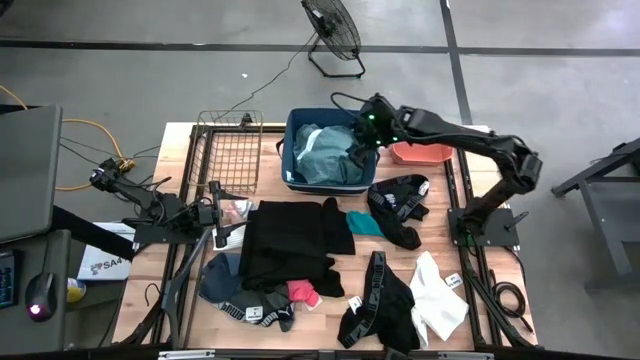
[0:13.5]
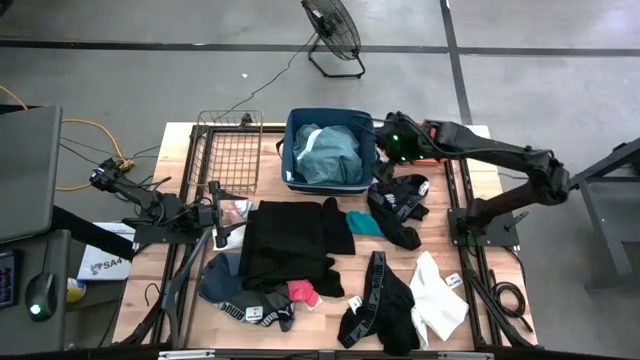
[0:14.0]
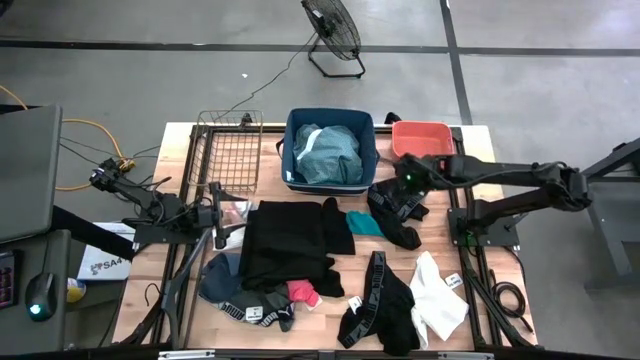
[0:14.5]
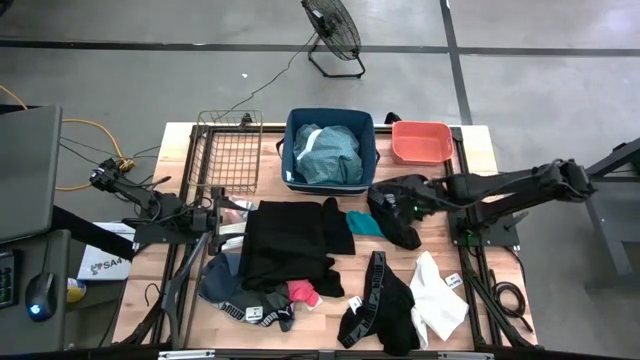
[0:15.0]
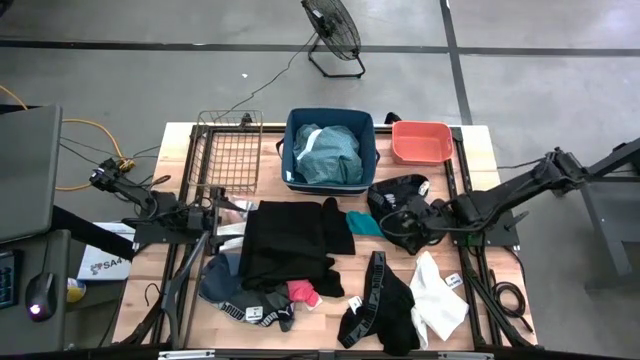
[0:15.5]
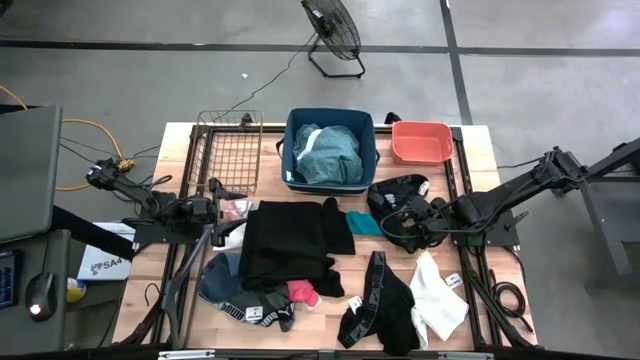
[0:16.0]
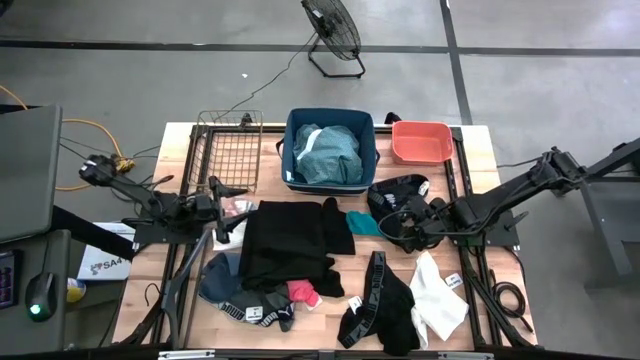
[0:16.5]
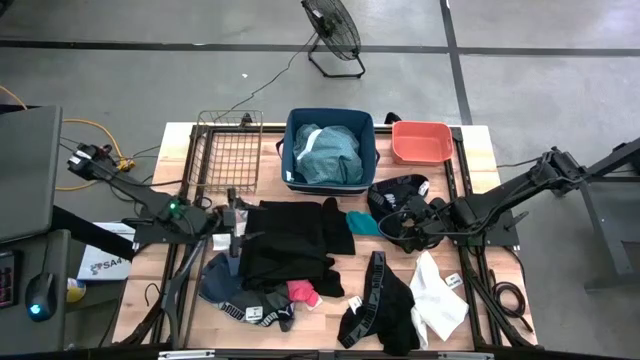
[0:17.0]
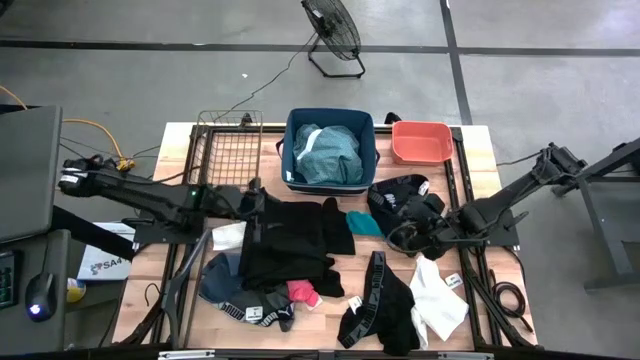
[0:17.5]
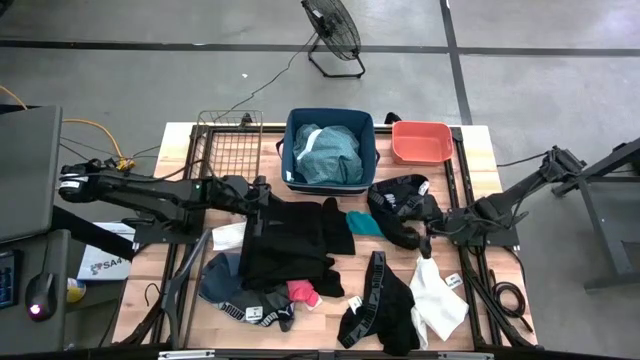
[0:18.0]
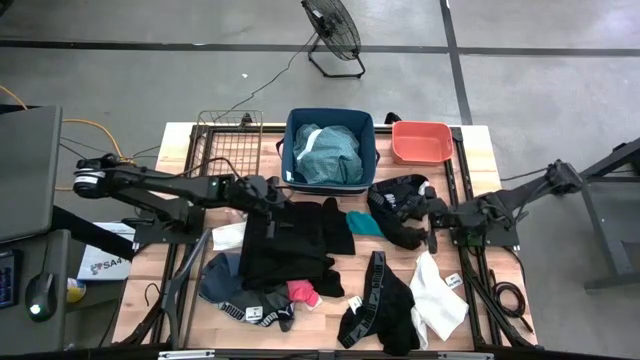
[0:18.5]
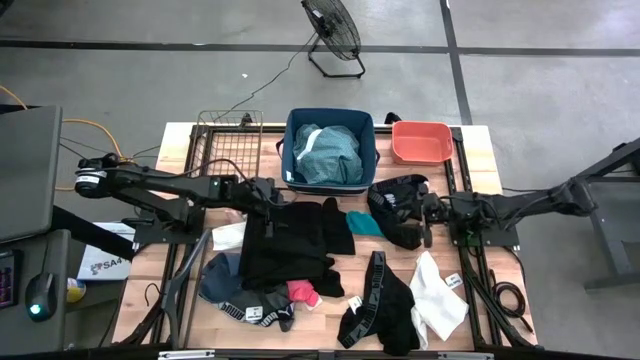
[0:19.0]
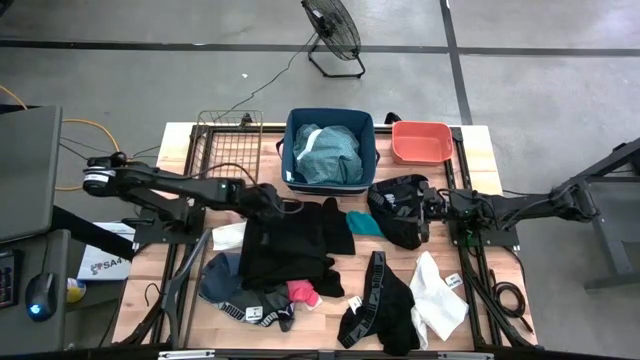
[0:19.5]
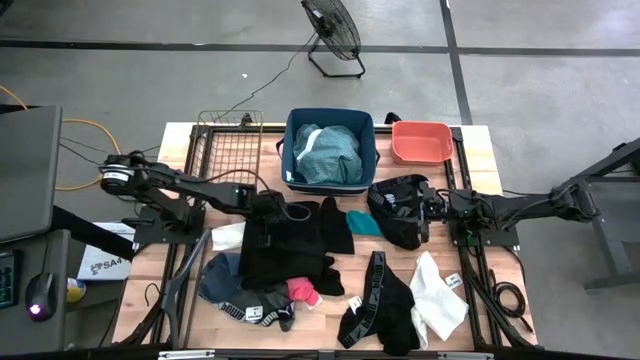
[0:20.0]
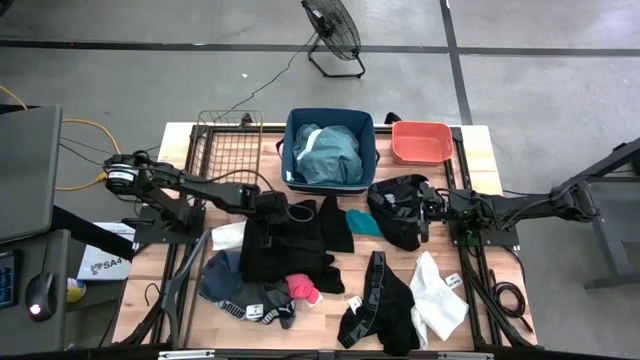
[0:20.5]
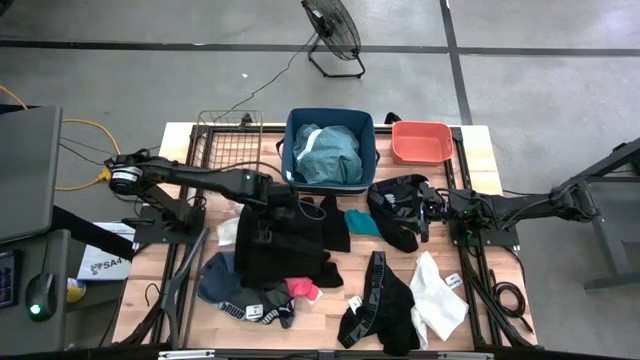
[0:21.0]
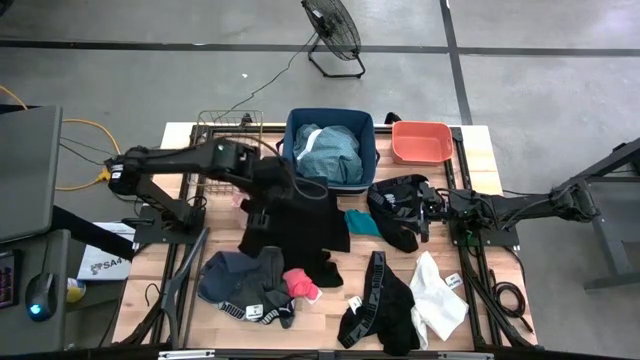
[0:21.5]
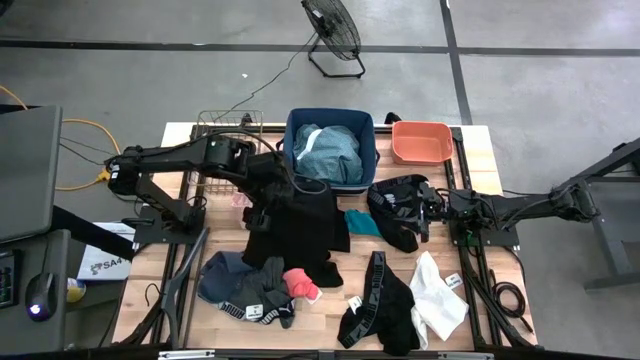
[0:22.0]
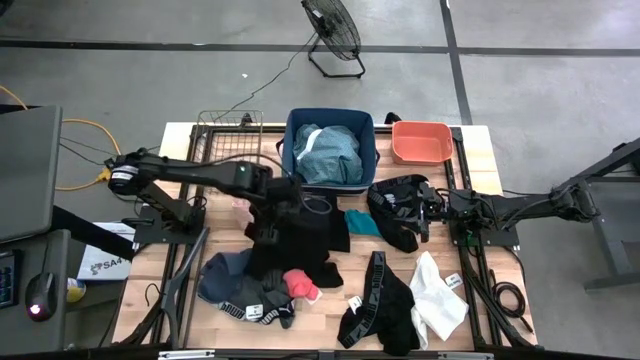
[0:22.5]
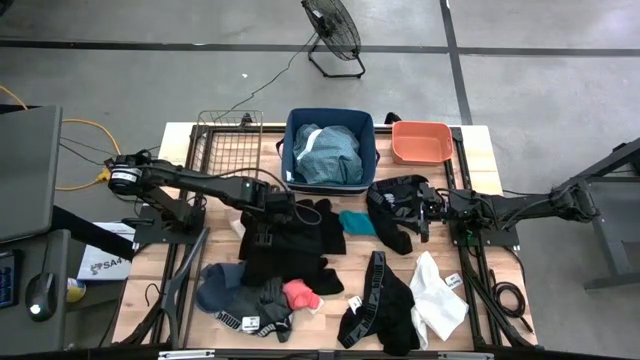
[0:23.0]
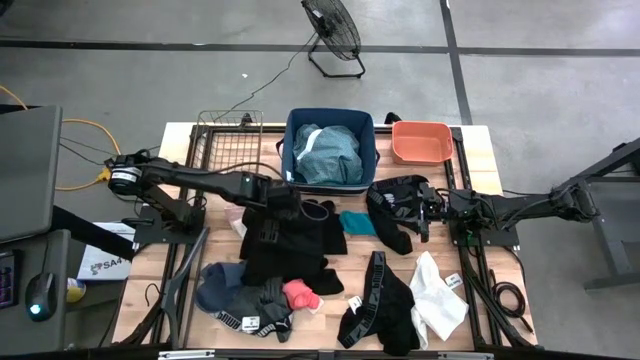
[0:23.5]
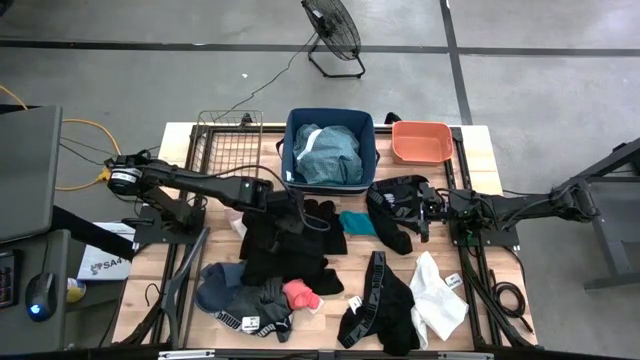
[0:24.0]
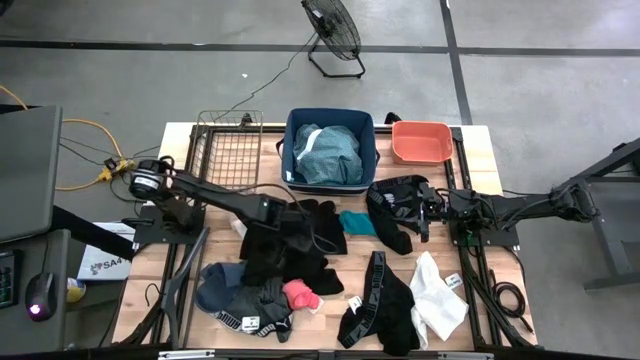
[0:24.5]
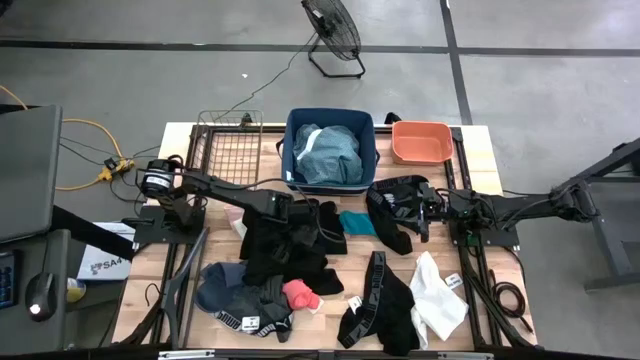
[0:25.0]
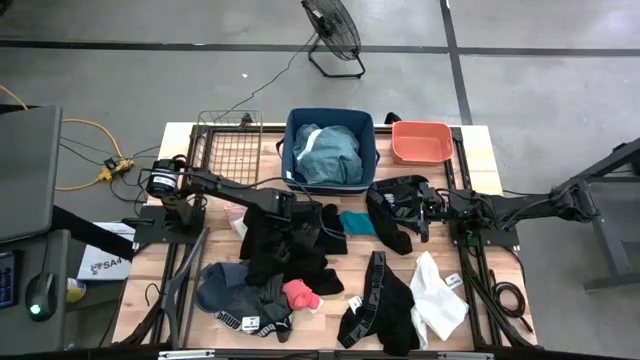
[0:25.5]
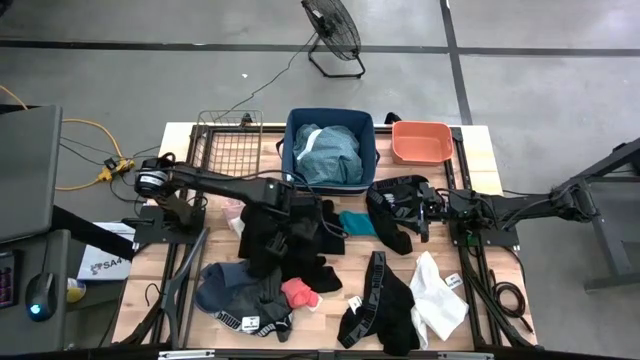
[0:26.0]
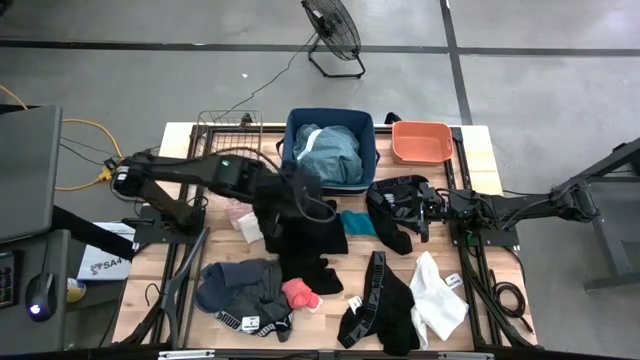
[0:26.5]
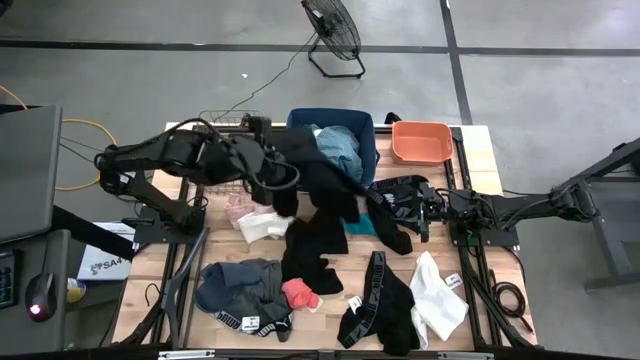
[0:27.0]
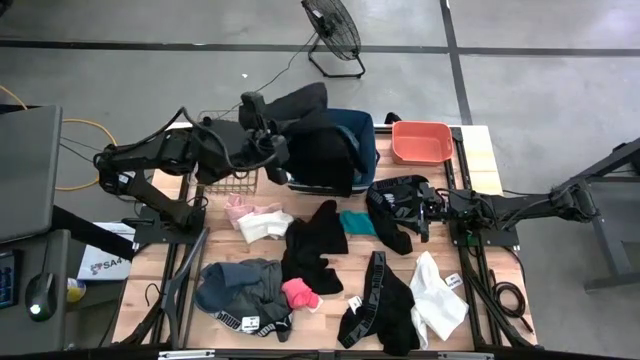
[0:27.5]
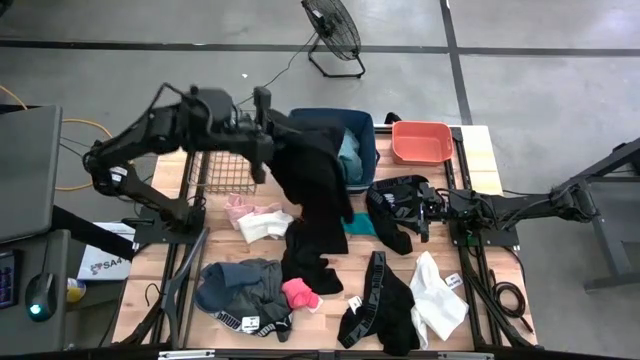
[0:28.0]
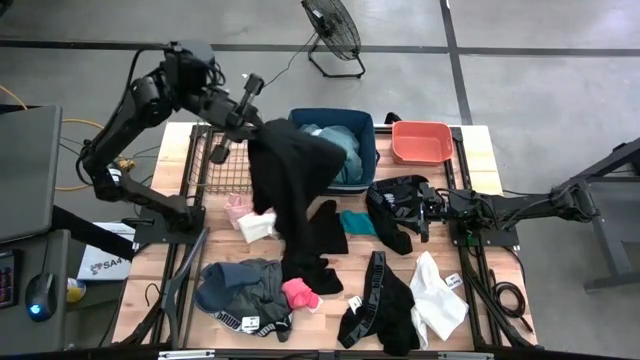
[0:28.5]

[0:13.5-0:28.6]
Task: Pick & Place Cloths
Put black shirt into the blue laundry organizer

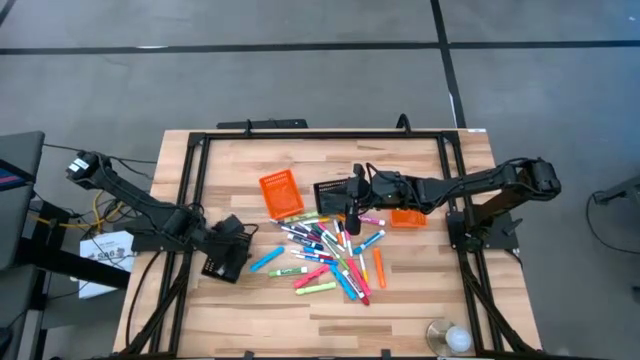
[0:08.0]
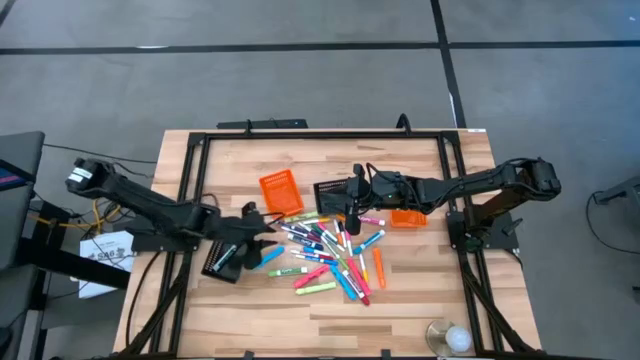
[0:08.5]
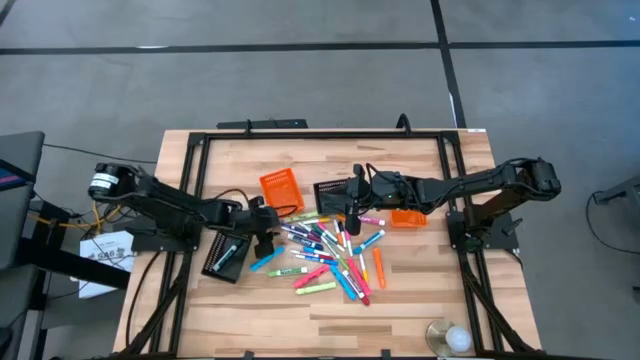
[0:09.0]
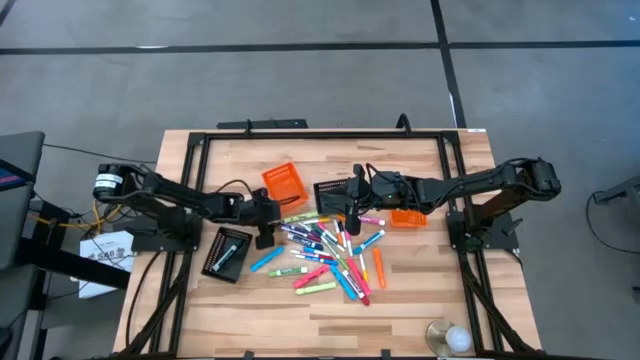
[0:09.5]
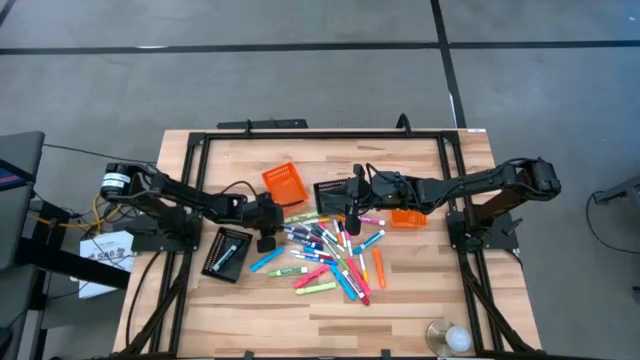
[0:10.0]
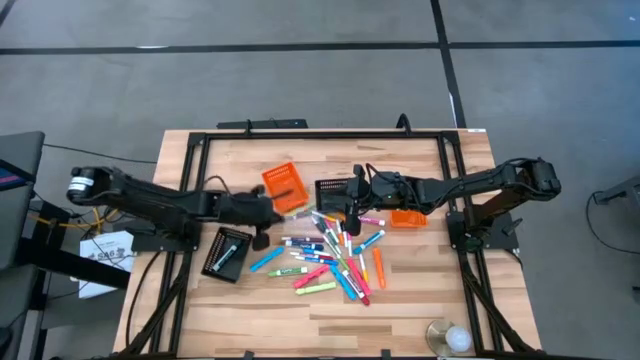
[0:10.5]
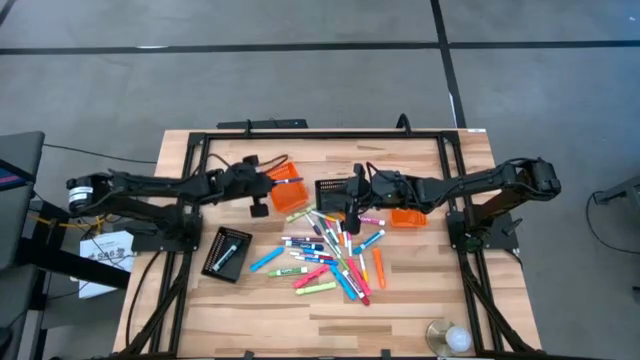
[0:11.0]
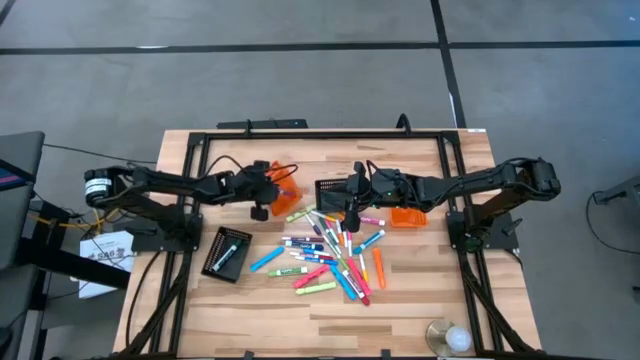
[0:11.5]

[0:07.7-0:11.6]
Task: Pick & Place Markers
Put the blue marker into the left orange bin

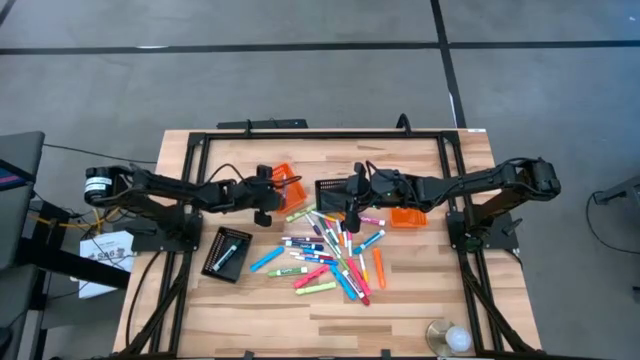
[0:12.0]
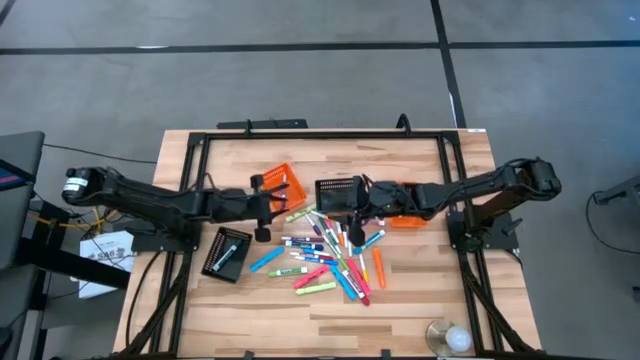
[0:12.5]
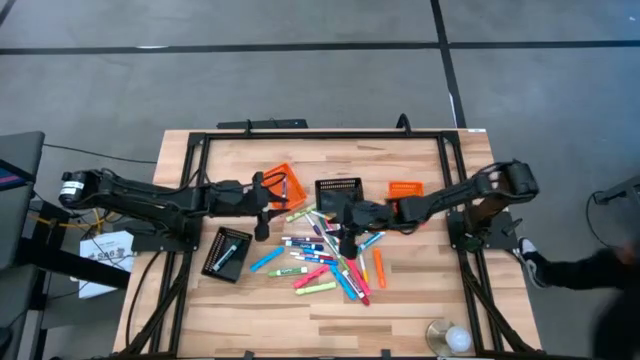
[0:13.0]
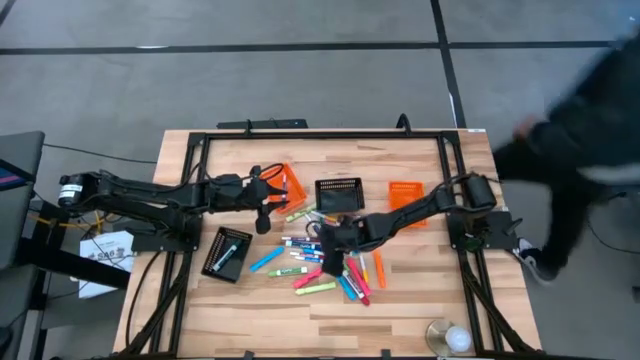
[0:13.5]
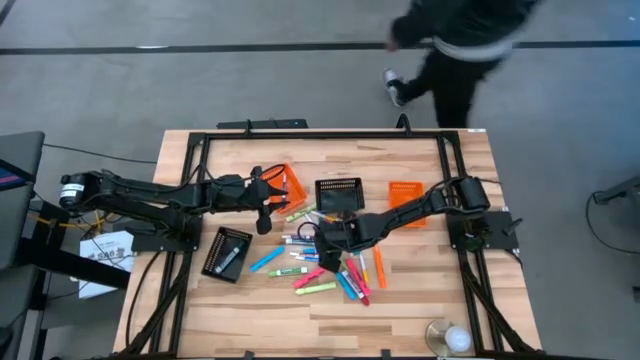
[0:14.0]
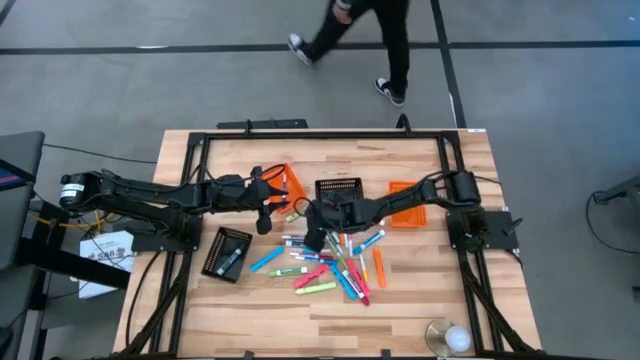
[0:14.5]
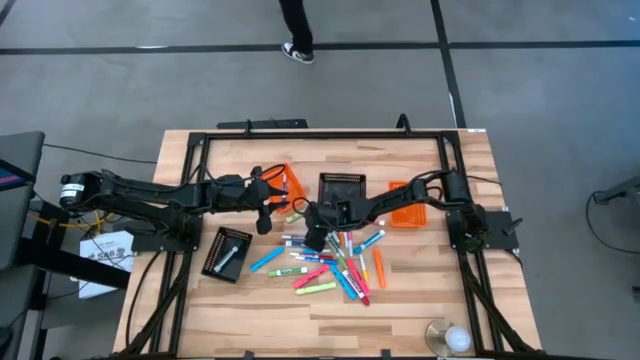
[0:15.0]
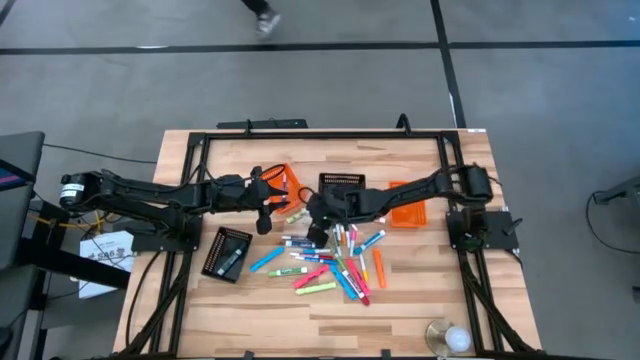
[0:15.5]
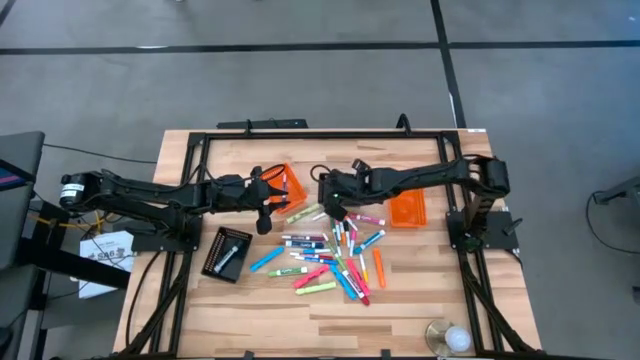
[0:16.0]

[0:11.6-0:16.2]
Put the blue highlighter into the right black bin
